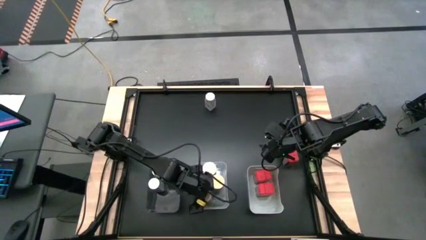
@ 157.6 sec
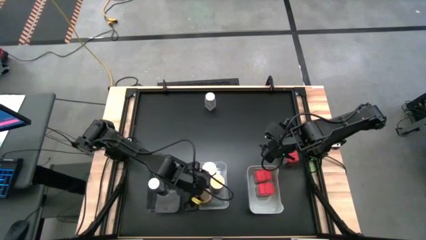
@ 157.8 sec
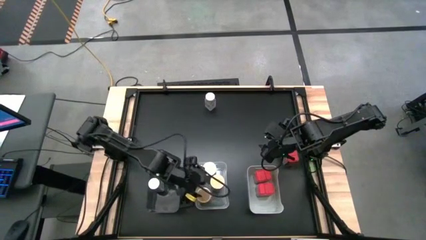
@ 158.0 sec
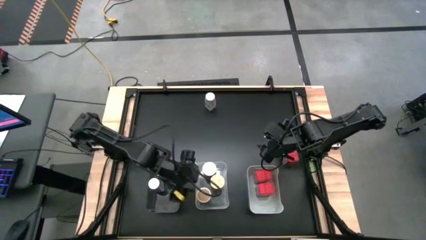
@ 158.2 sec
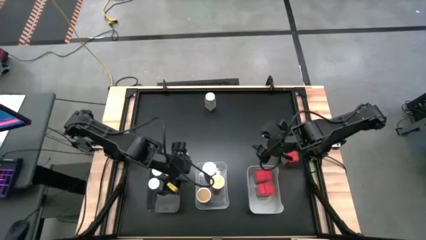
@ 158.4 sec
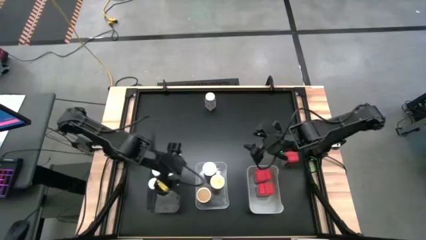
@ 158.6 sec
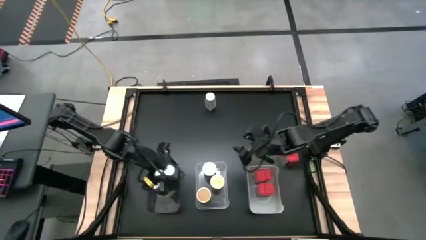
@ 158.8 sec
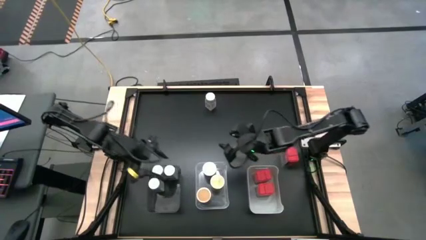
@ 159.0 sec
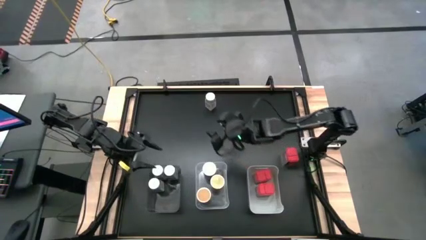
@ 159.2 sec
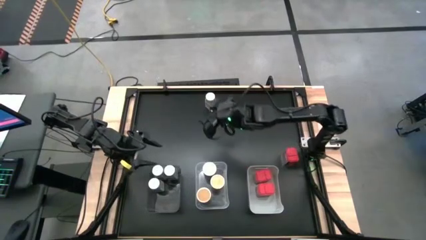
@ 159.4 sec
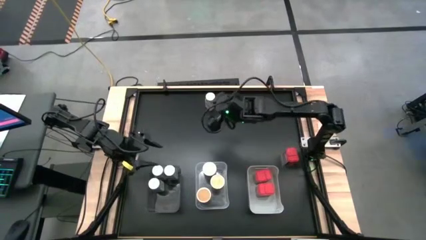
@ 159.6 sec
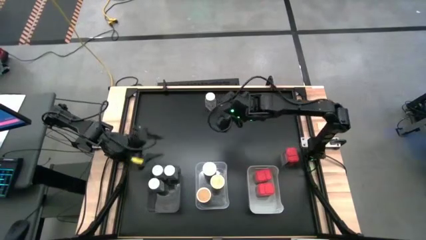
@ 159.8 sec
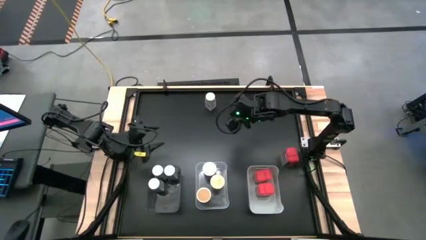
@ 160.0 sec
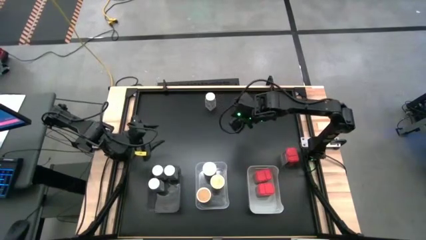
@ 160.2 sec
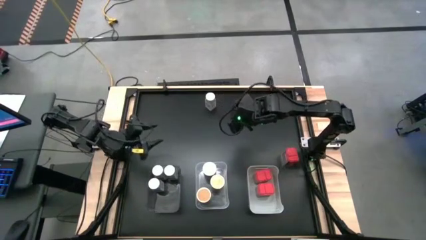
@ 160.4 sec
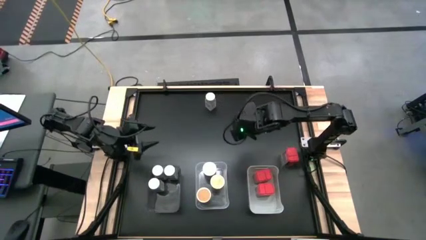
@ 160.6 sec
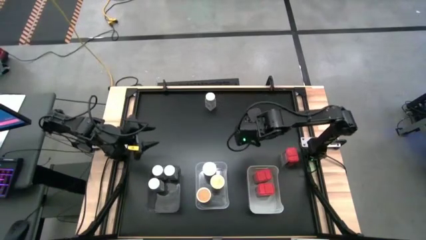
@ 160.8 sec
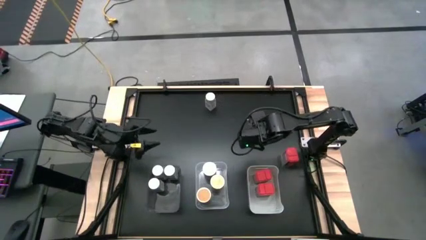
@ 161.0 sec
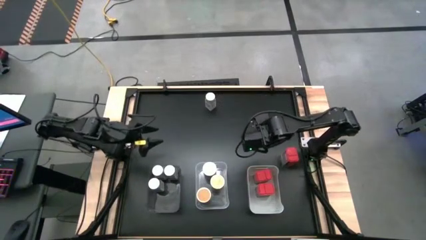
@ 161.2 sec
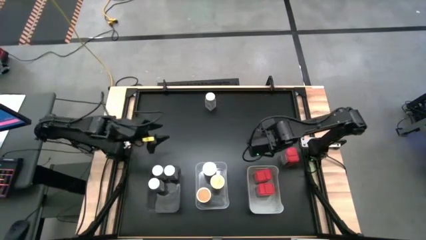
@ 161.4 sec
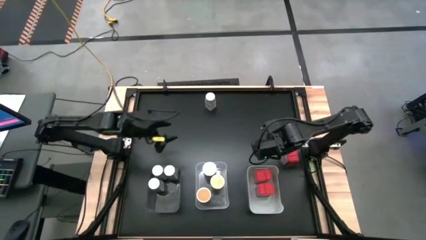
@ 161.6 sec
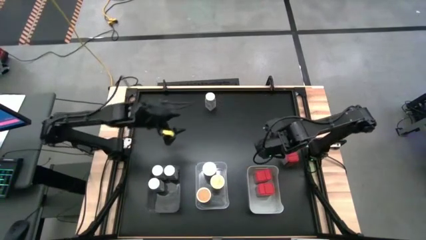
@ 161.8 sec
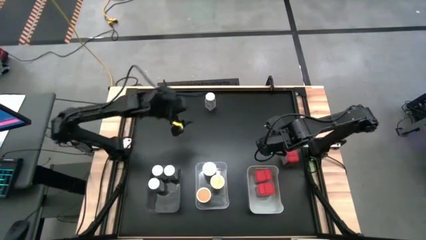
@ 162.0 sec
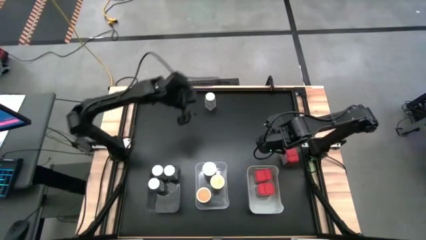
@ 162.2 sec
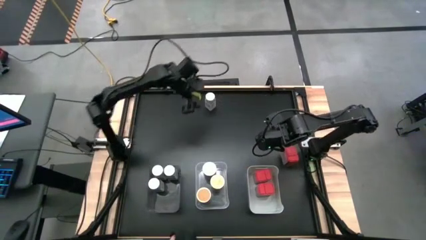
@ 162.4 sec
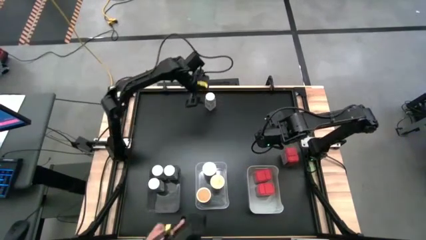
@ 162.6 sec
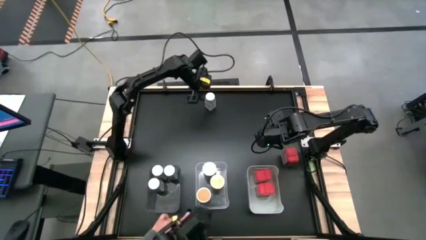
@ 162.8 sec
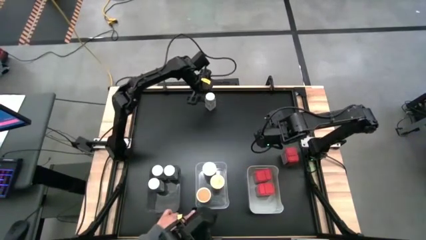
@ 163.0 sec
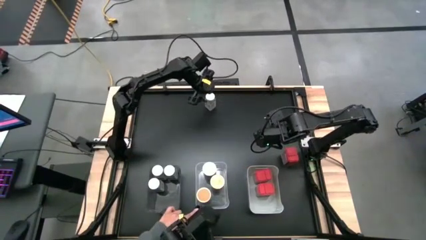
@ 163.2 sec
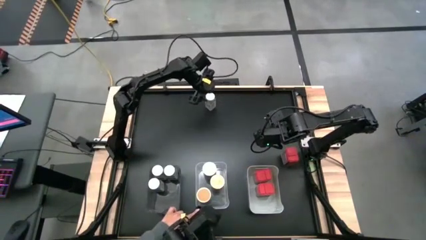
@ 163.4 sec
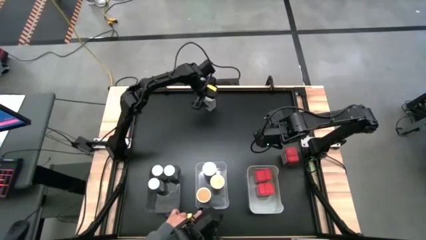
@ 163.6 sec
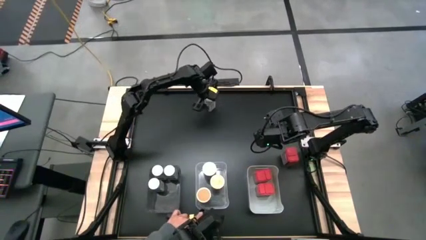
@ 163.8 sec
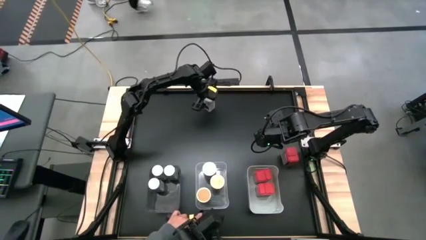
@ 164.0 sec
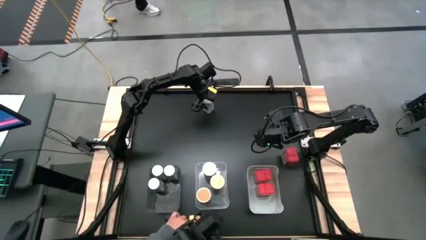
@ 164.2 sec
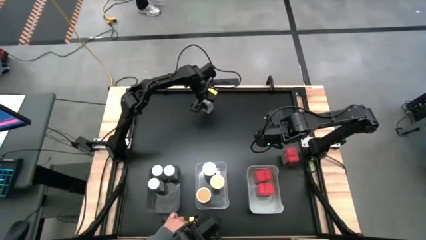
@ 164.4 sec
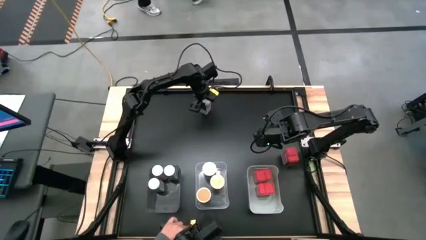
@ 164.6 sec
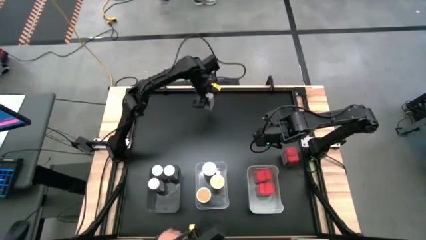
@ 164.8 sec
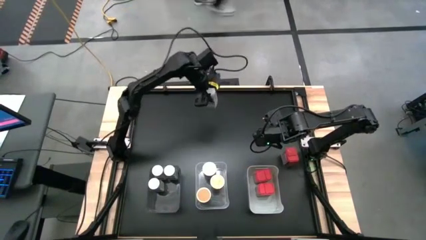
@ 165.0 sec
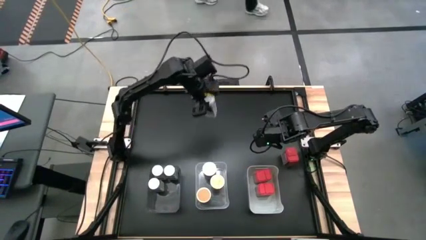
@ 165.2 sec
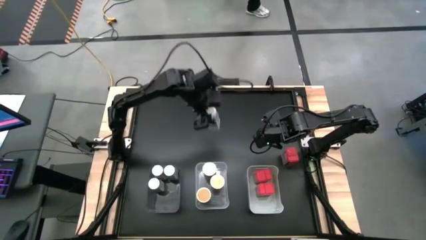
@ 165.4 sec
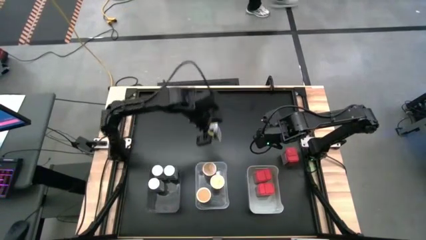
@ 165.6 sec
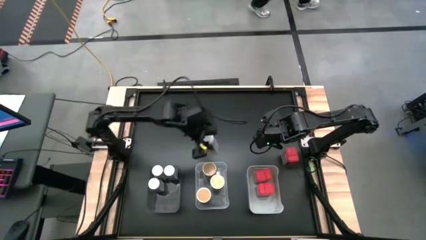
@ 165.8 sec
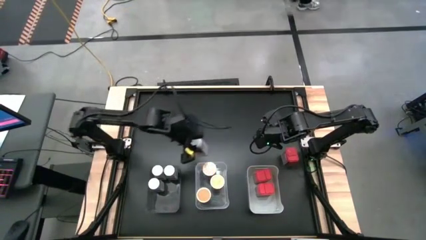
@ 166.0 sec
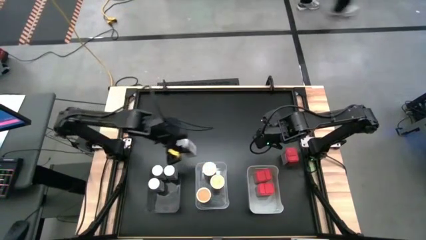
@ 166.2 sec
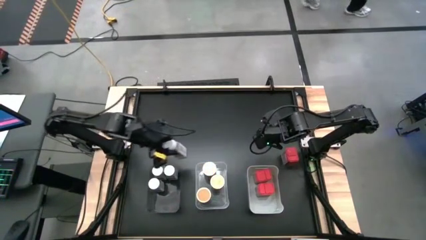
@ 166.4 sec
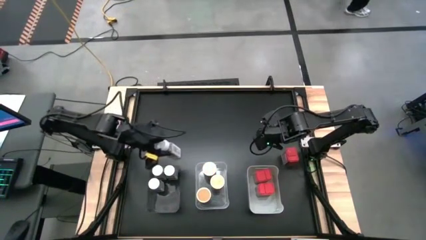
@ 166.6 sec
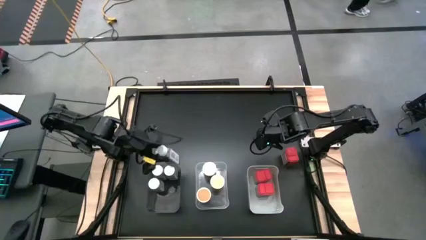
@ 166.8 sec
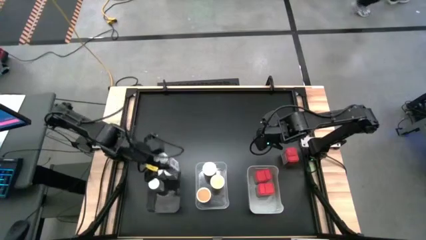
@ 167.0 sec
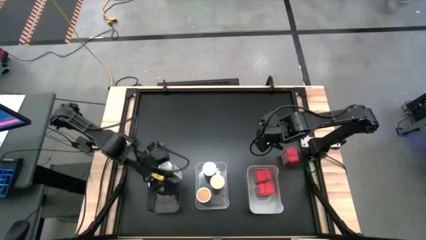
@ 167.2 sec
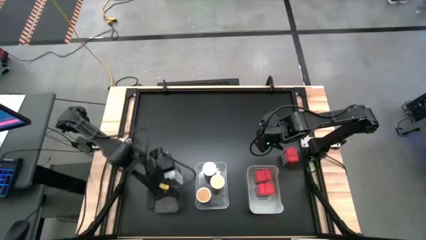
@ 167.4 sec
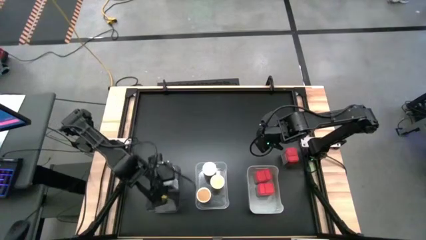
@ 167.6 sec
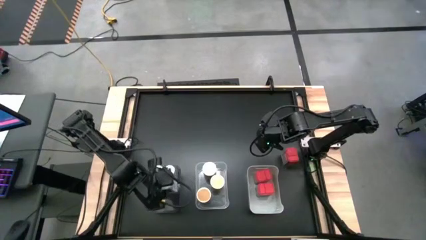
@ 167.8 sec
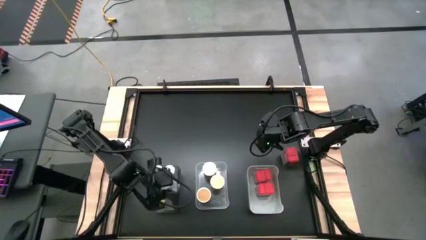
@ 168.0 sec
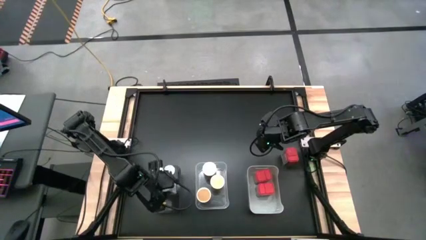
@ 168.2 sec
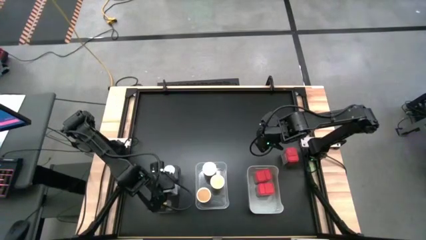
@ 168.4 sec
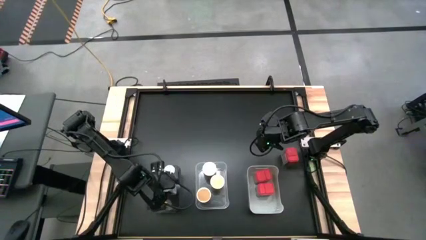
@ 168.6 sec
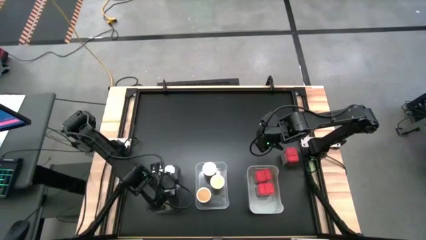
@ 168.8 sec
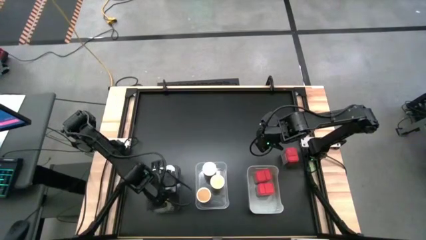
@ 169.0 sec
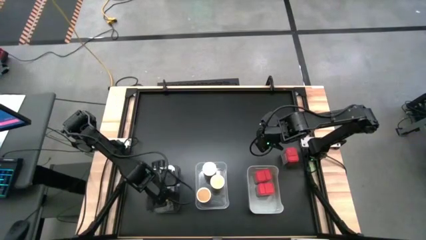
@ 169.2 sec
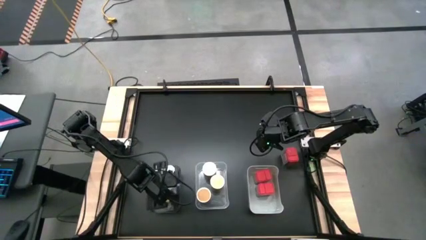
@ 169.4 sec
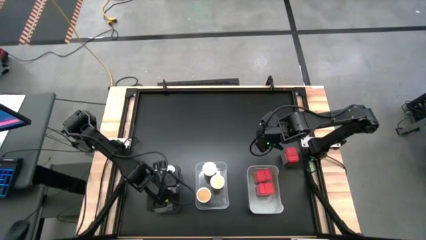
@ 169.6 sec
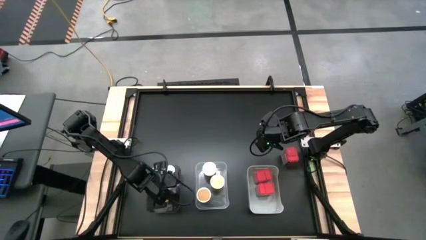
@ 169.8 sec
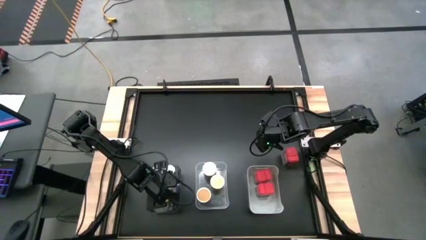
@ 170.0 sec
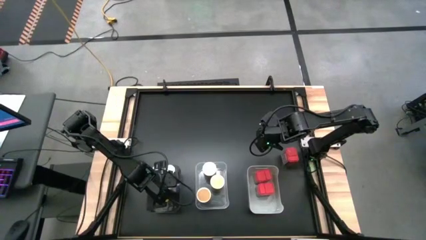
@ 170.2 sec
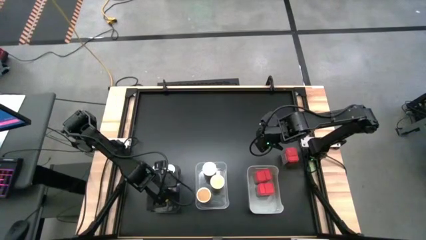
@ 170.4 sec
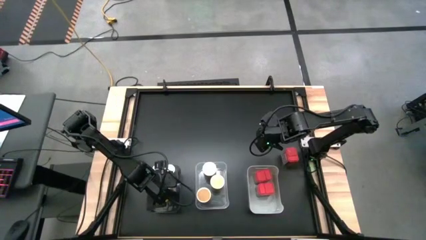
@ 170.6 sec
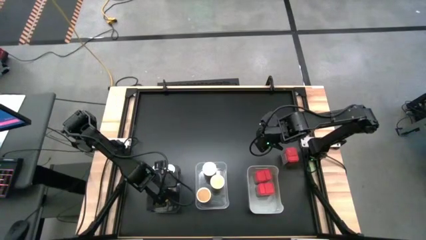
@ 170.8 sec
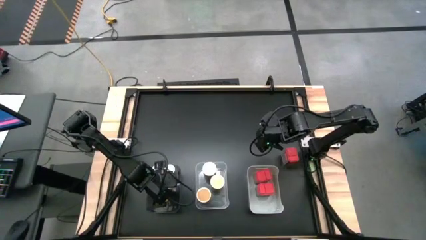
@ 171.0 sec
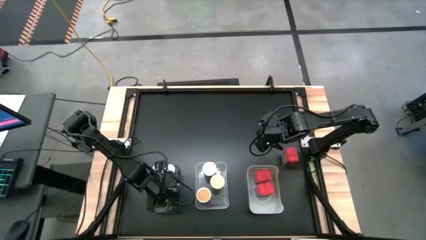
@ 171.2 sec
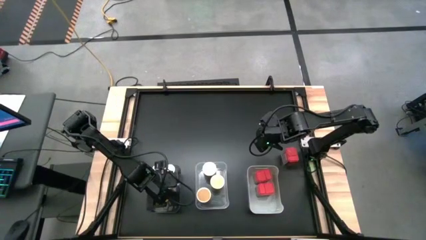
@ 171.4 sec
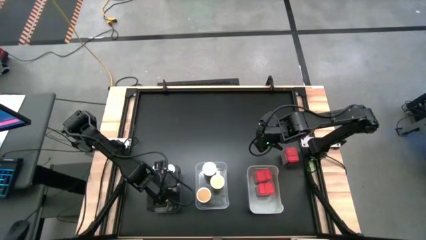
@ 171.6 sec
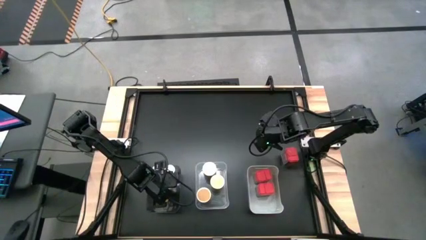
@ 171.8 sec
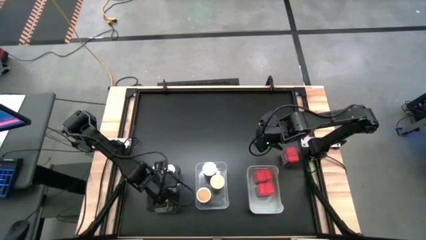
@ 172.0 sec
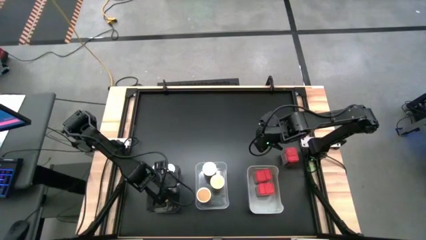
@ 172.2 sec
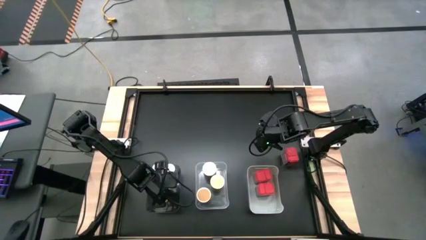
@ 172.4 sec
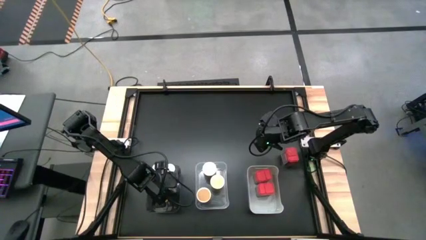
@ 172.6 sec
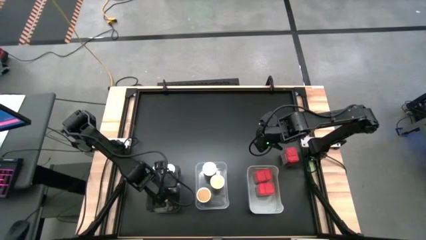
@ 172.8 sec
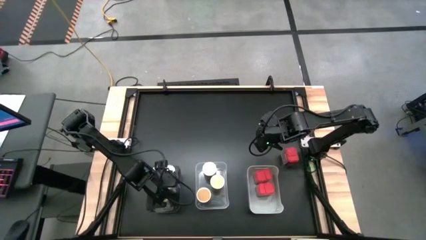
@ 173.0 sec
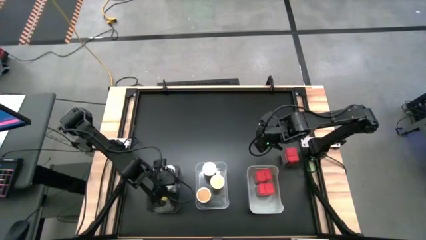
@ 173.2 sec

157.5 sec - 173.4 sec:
Task: Sort spices by type
Put the white seasoning bottle into the black bin

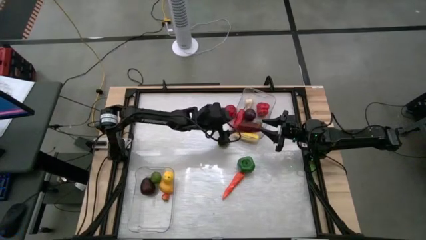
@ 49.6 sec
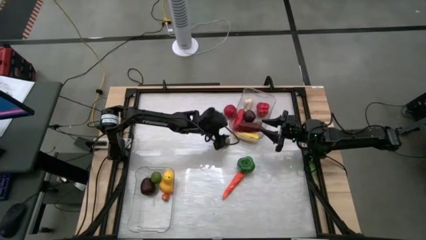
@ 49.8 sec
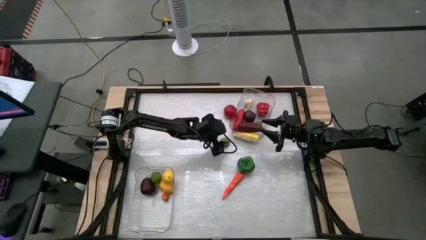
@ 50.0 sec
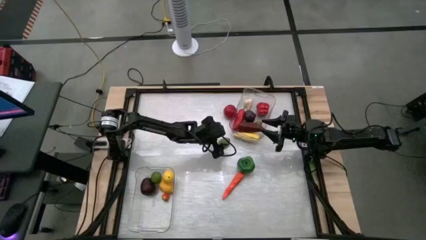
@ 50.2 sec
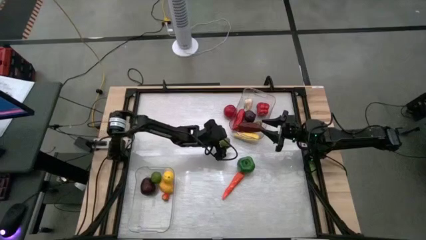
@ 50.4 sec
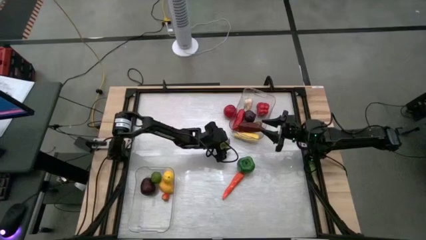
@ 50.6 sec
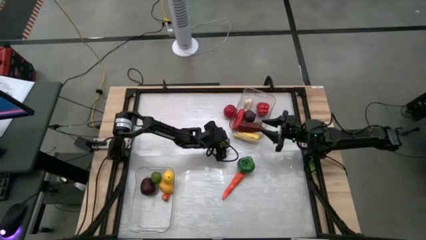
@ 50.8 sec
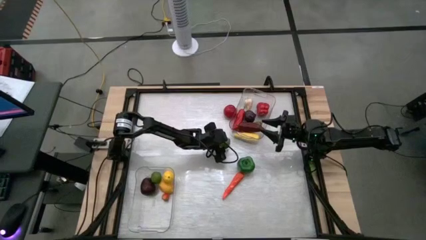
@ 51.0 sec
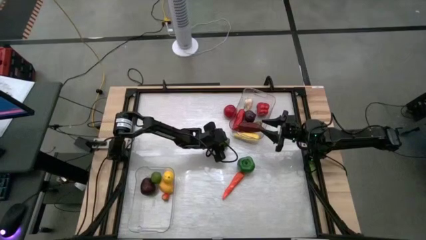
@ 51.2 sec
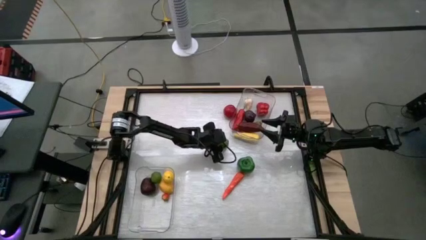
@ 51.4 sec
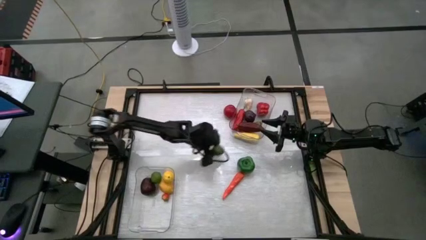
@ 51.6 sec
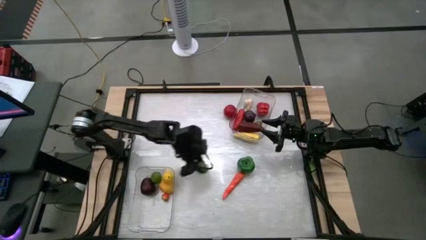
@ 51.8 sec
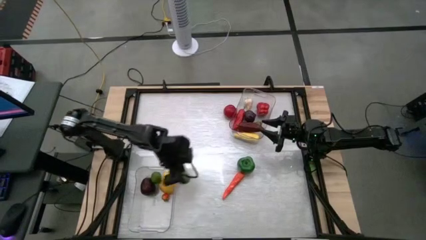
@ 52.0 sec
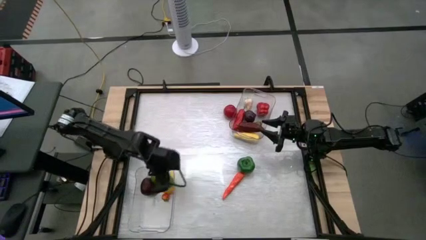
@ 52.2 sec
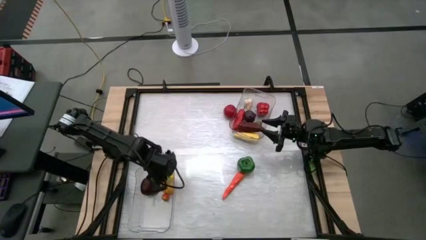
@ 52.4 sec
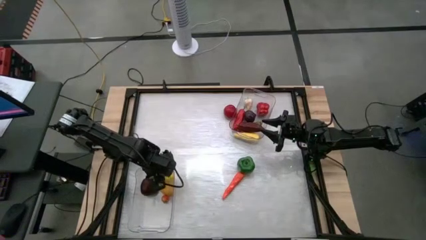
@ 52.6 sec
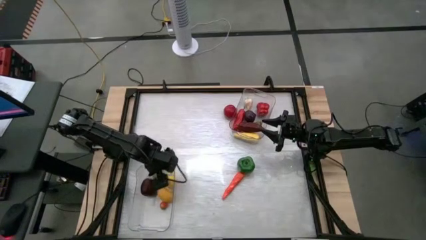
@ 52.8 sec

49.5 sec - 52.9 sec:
Task: Sort produce into baskets
Put the green lime into the bottom transparent bin
